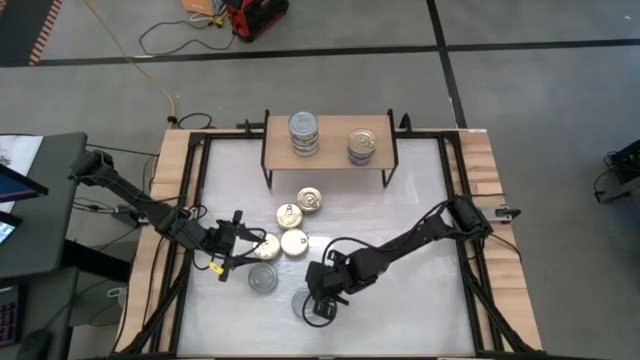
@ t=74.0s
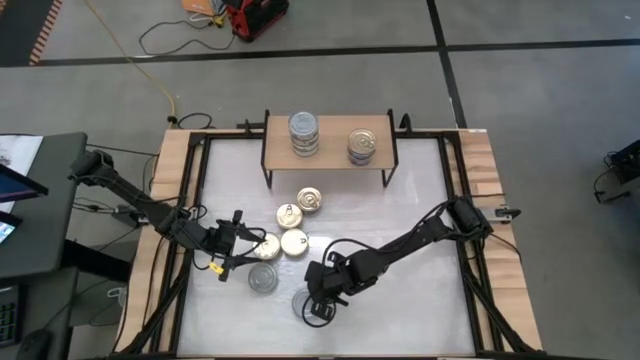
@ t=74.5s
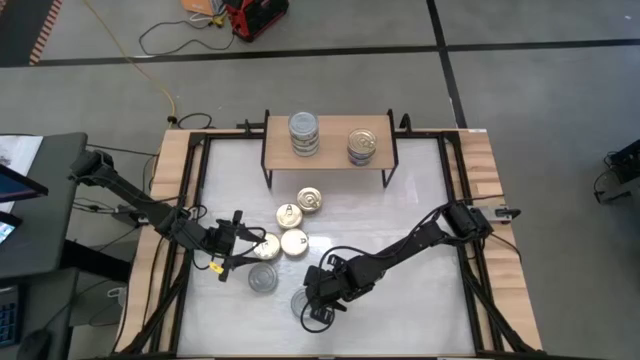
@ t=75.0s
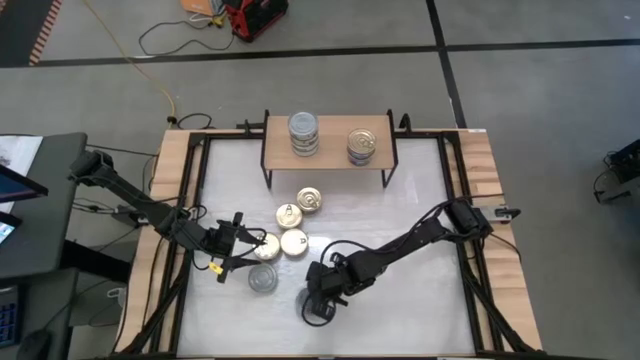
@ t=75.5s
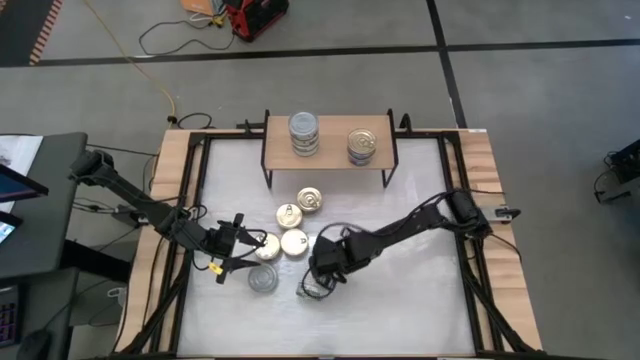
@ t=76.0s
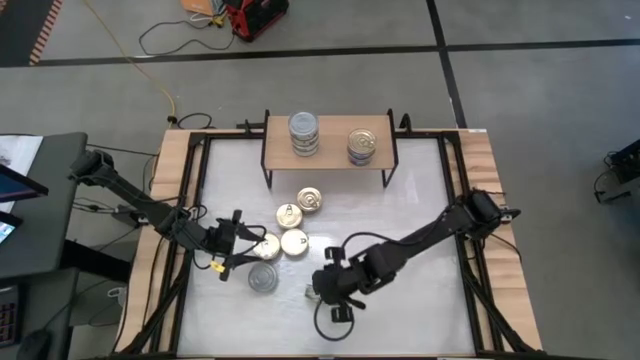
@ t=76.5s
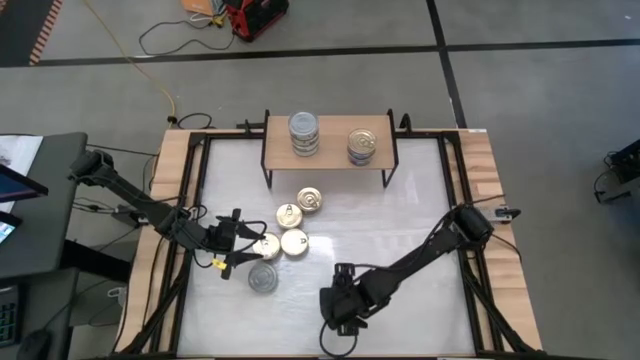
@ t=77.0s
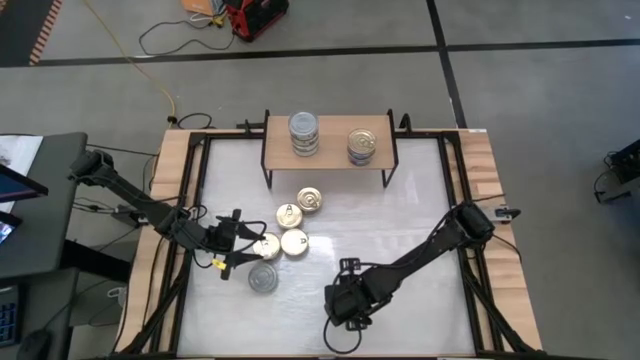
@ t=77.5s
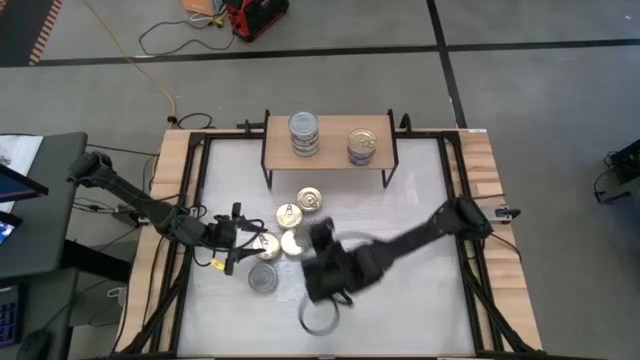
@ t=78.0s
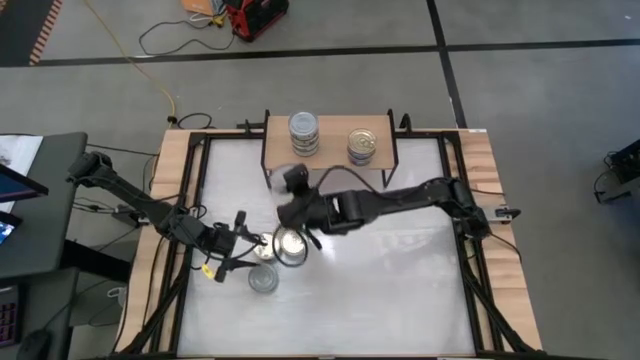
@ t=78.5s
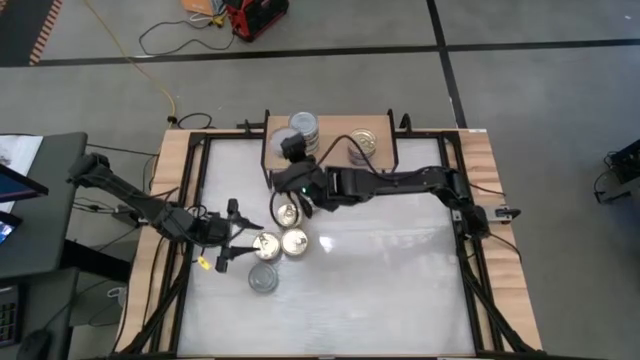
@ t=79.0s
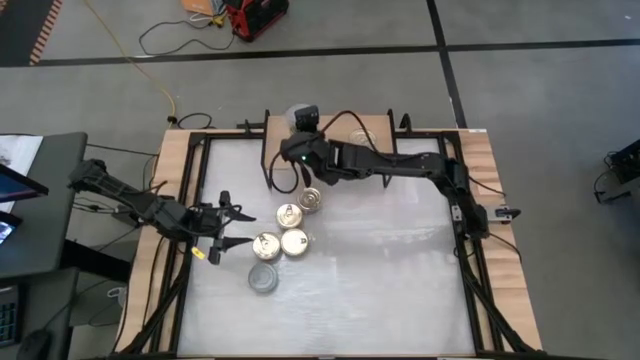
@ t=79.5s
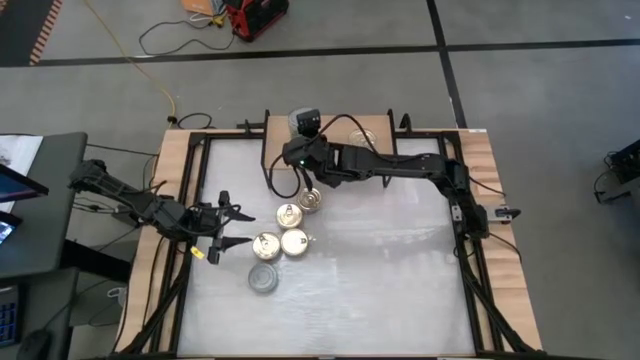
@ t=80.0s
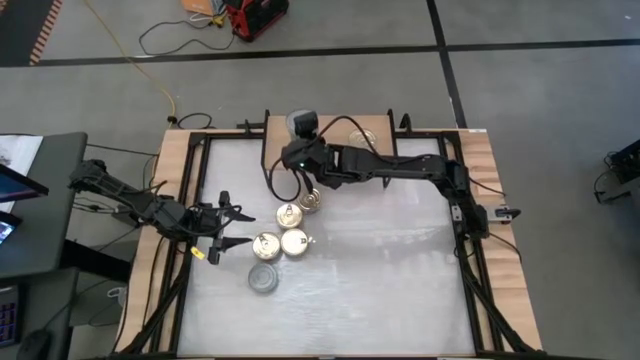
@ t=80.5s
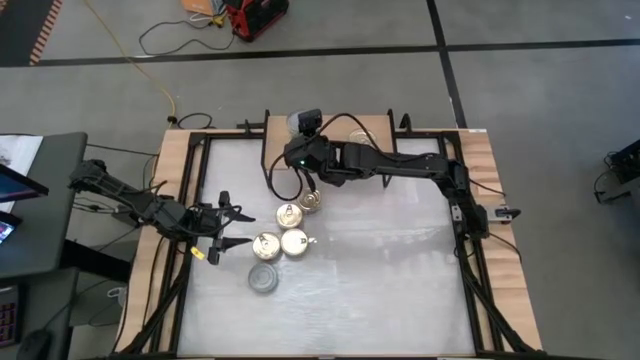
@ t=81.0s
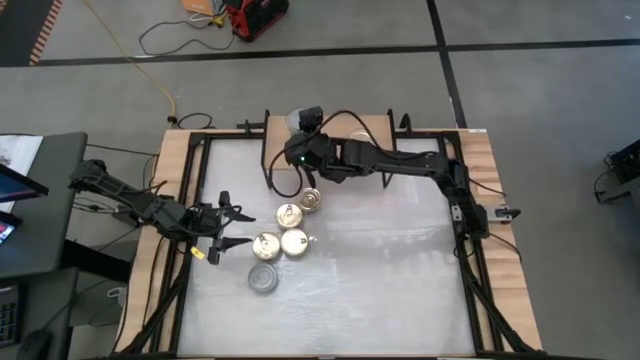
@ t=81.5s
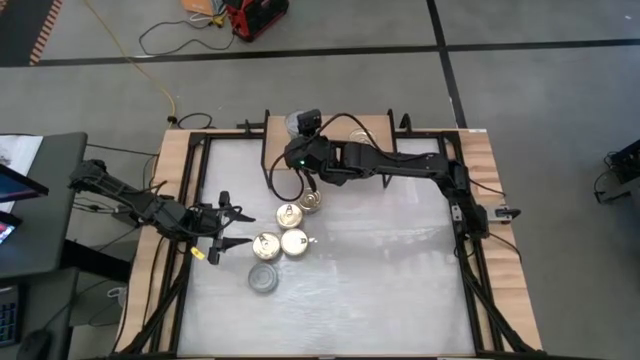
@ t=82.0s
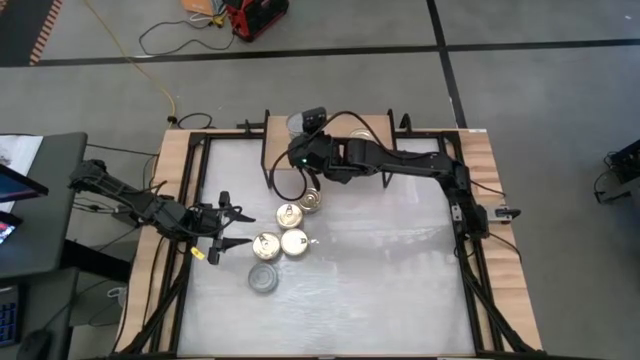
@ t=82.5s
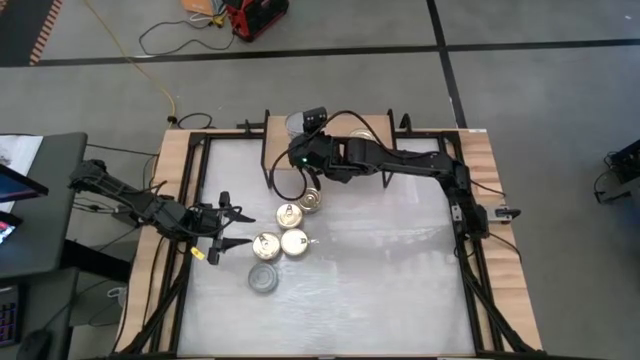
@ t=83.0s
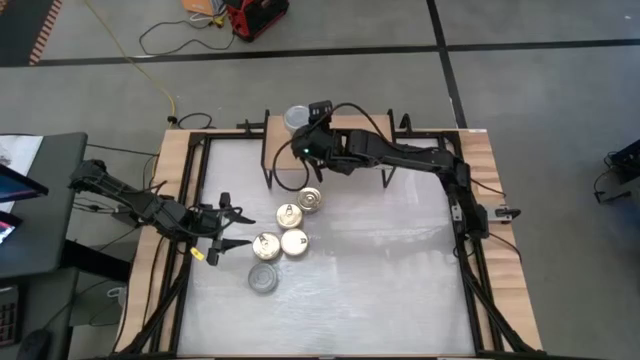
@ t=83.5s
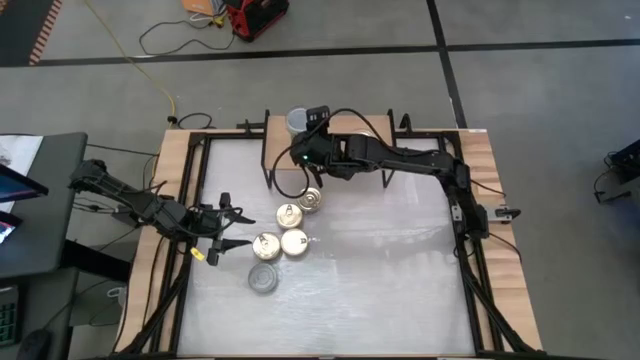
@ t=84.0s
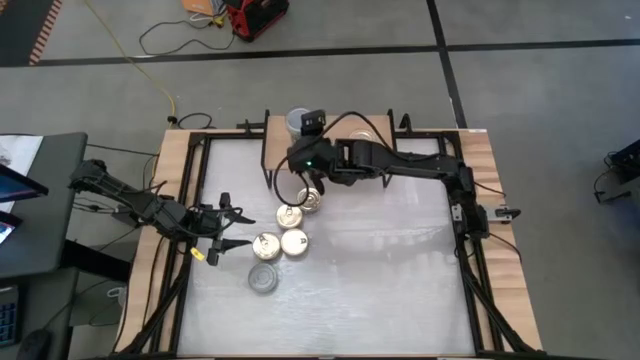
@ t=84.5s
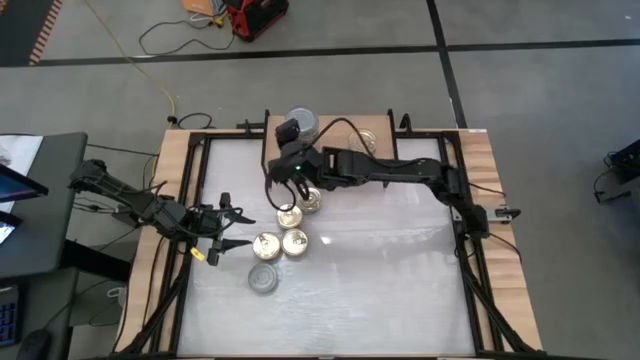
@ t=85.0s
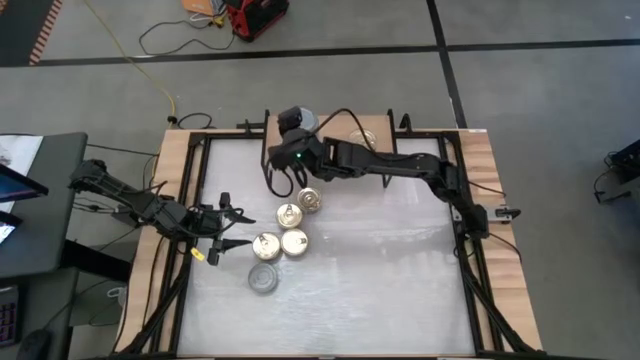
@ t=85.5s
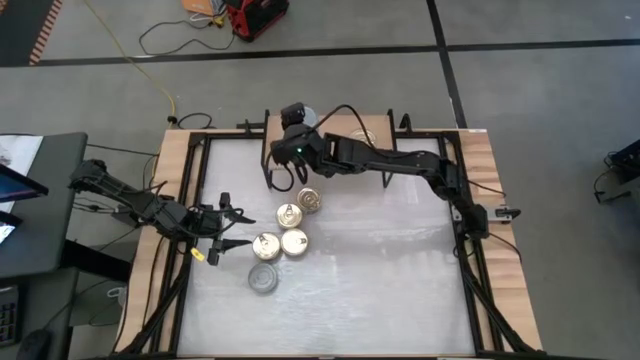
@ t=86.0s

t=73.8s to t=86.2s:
Task: Stack canned seafood by type on shelf
Stack the green white tuna can on top of the other green white tuna cans on the shelf

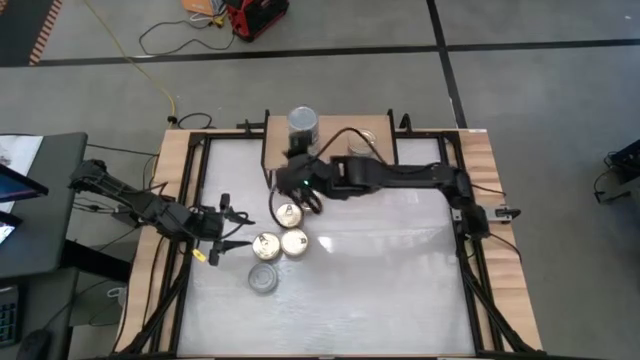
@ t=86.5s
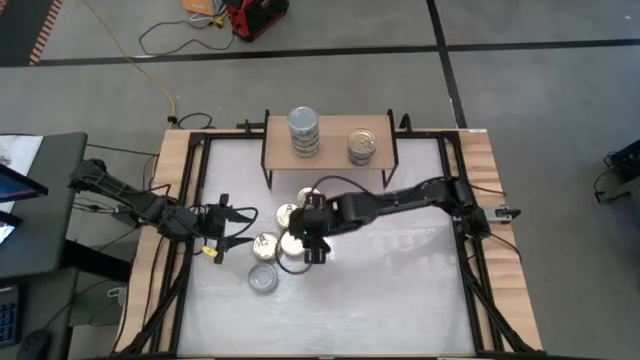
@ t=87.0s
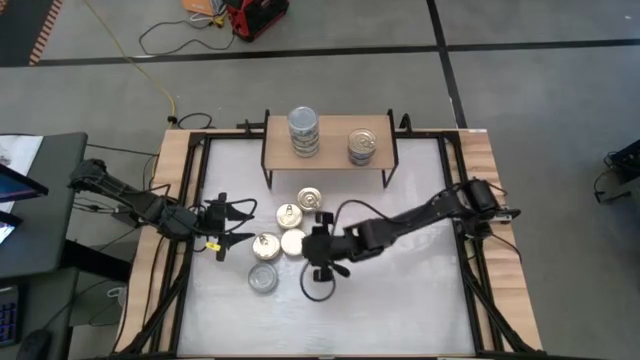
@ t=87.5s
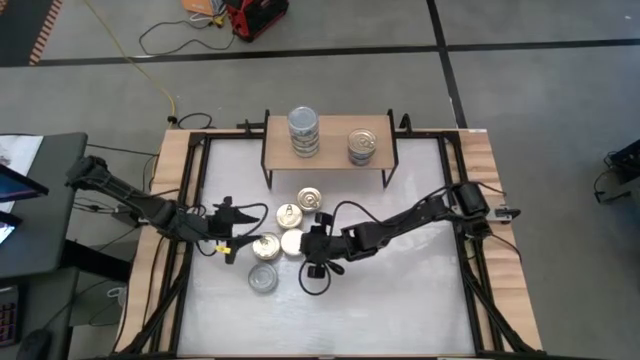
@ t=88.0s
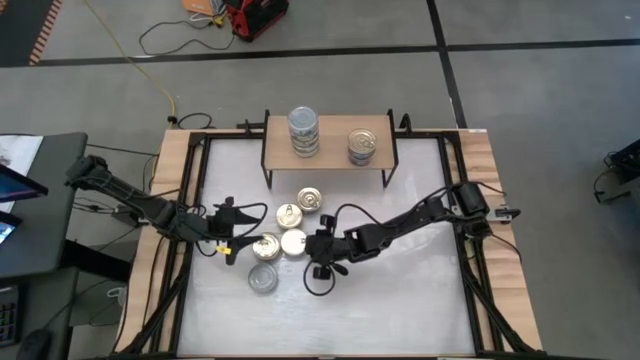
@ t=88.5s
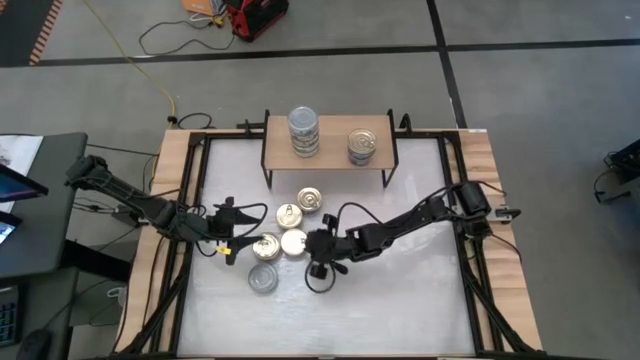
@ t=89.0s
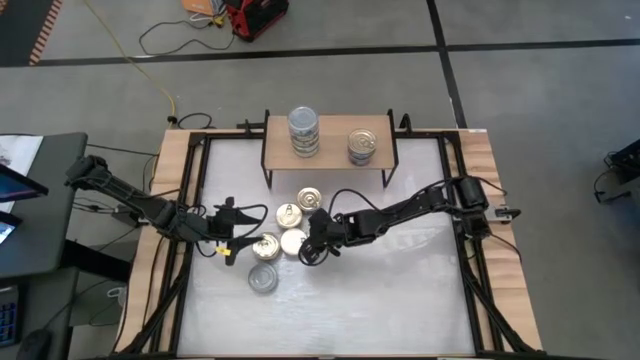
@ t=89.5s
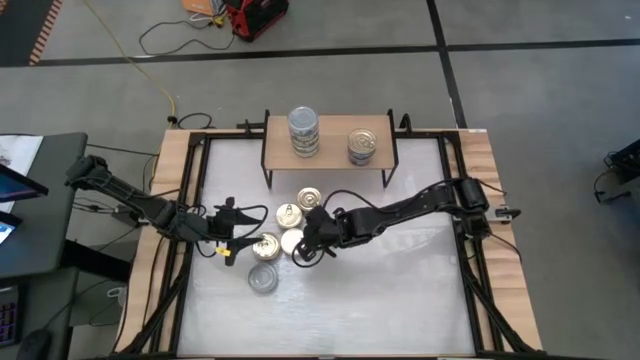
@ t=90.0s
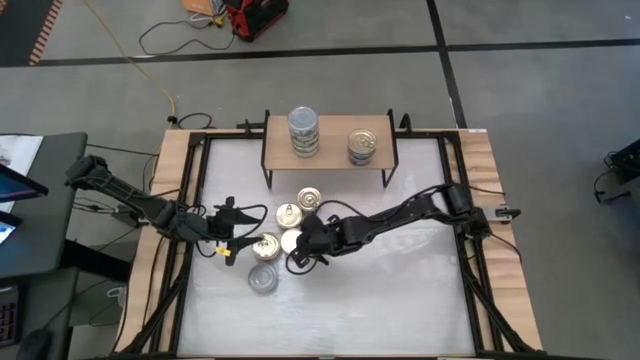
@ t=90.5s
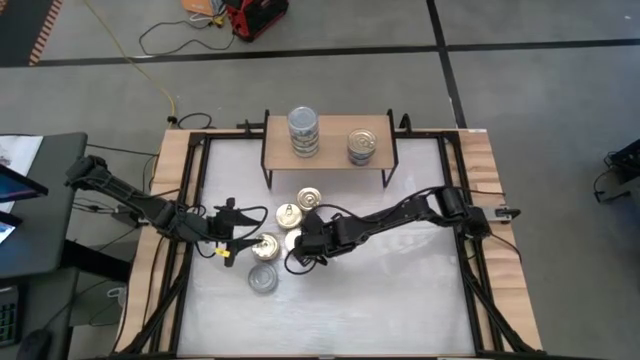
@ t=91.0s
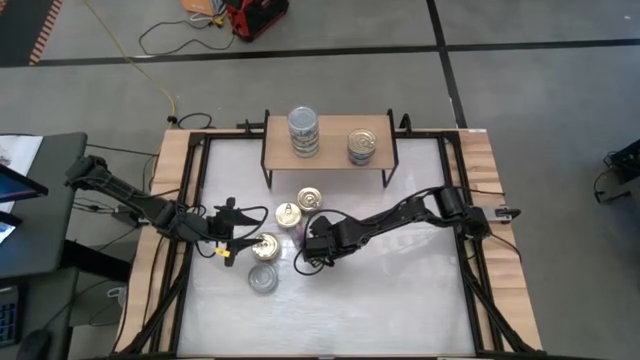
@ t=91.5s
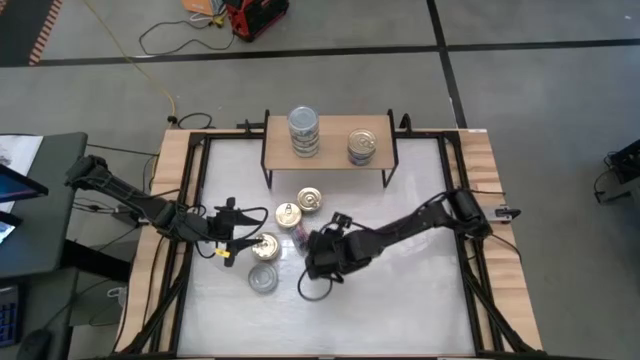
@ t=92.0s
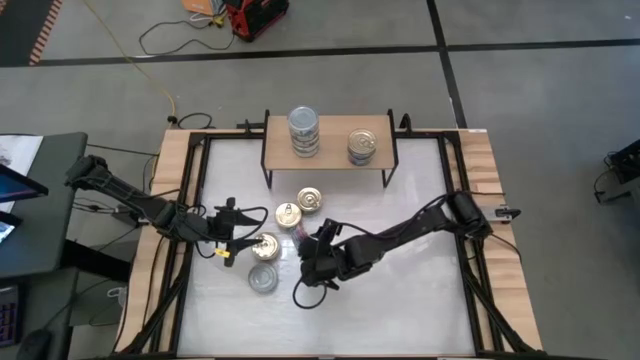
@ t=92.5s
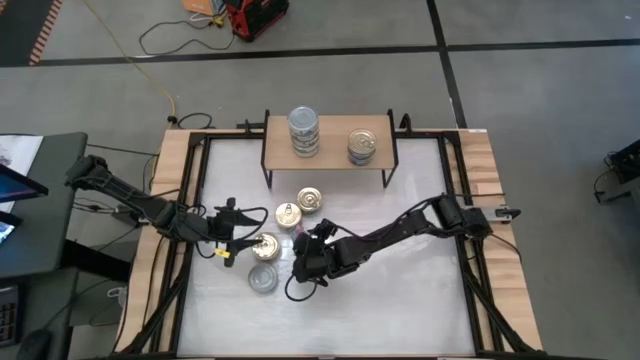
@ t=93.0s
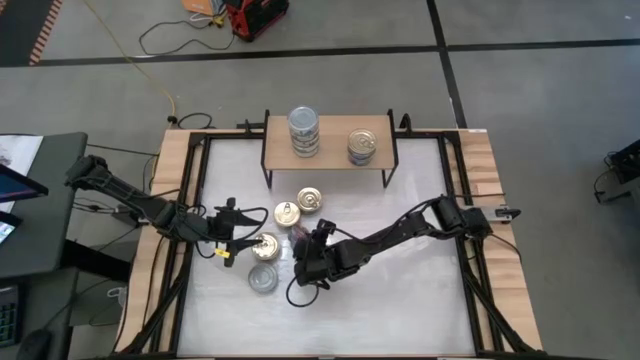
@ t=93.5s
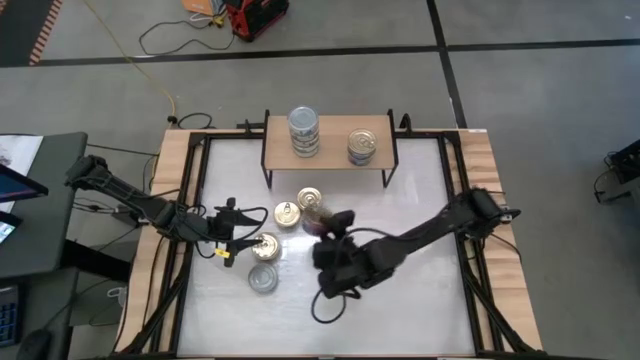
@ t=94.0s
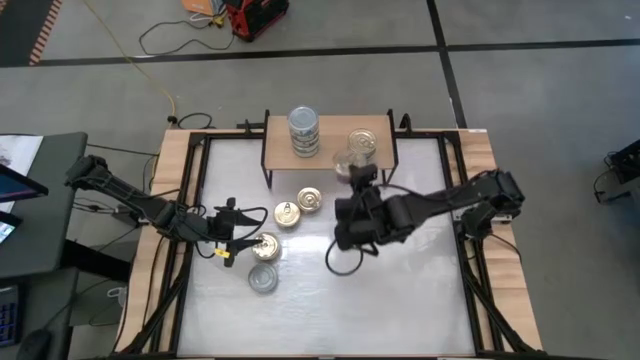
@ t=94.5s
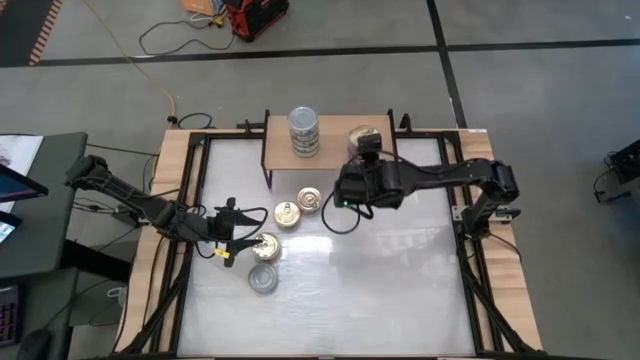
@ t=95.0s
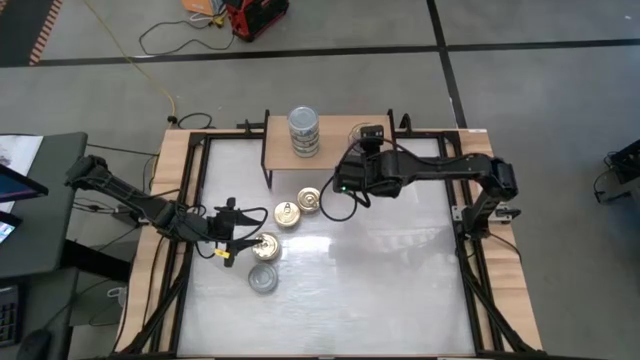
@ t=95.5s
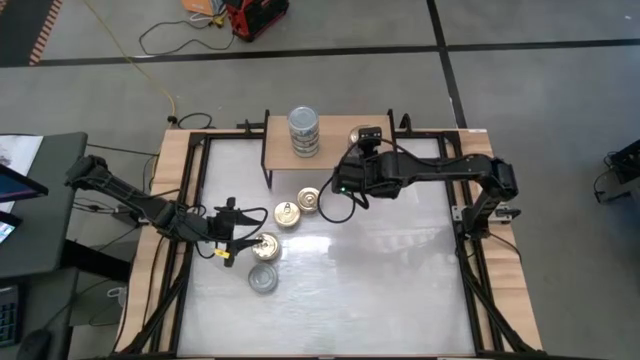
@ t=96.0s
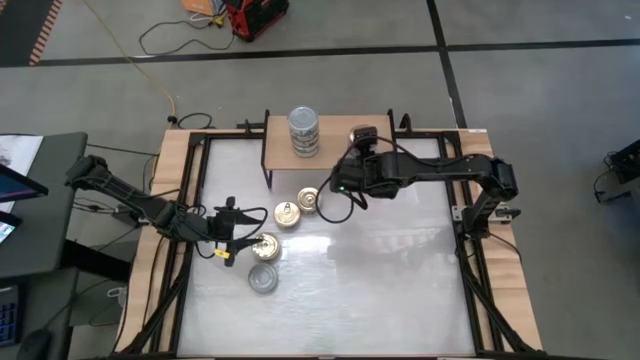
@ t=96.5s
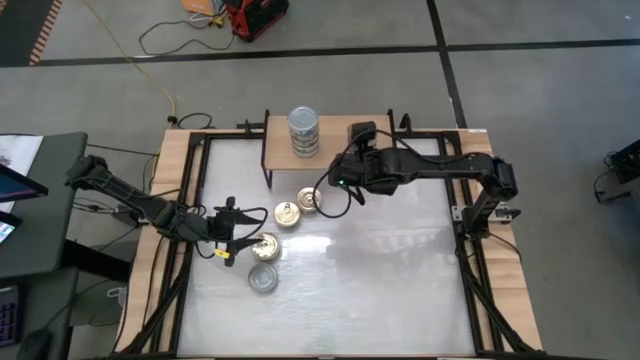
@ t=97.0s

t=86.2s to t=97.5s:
Stack the blue pink tuna can on top of the other blue pink tuna cans on the shelf
